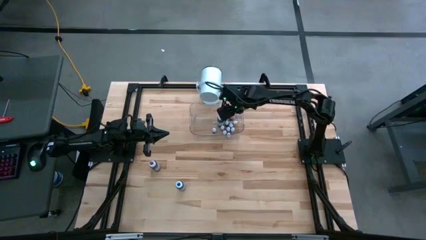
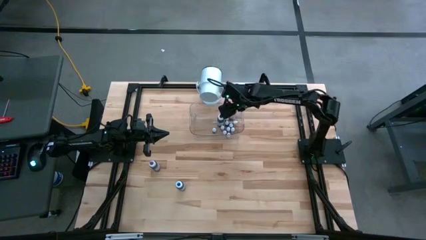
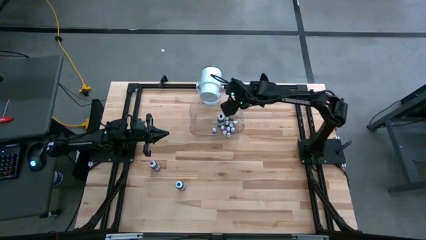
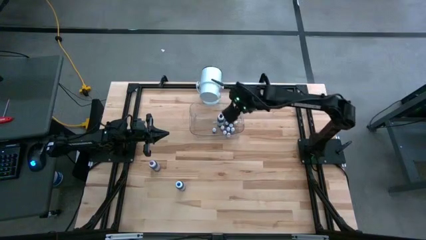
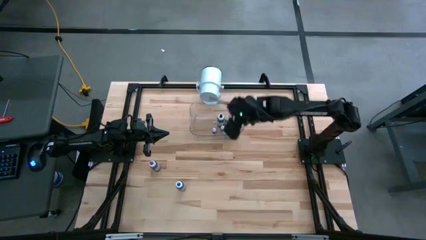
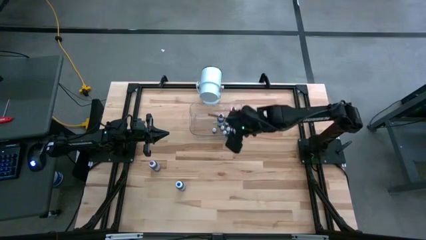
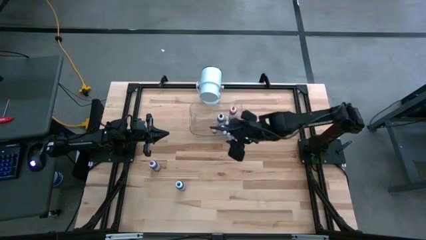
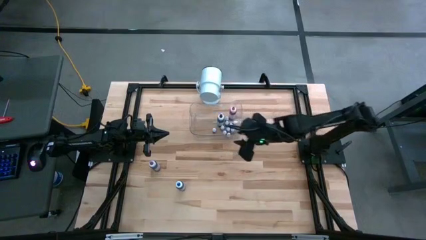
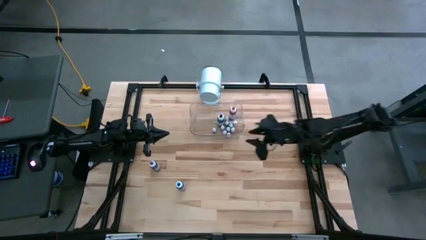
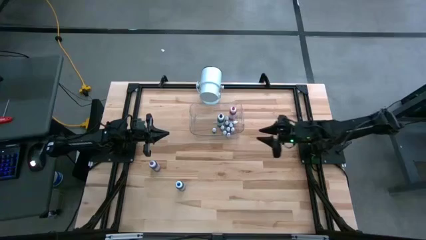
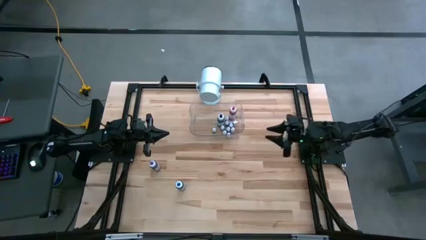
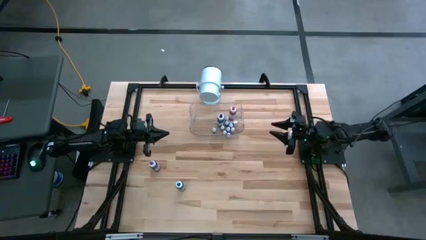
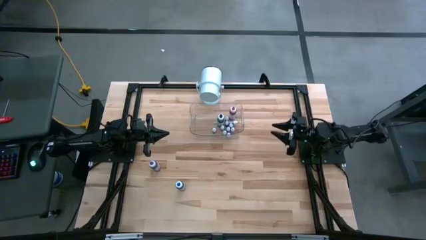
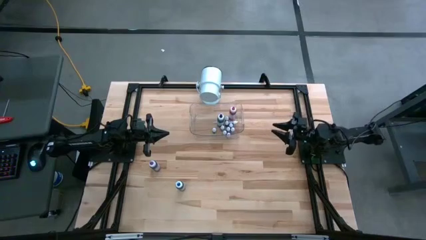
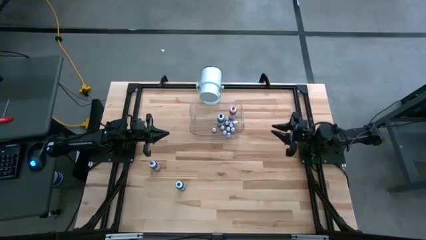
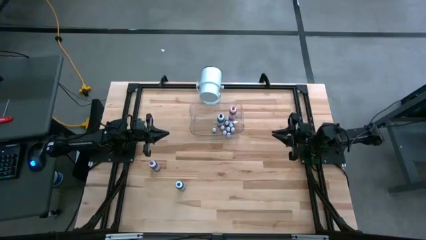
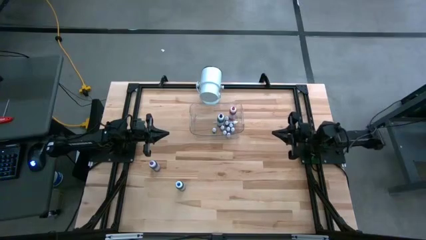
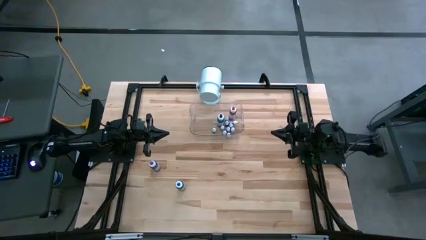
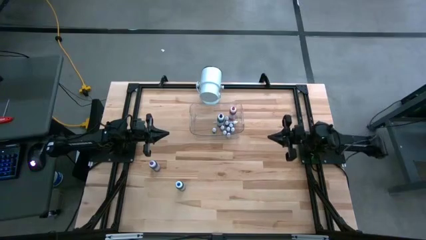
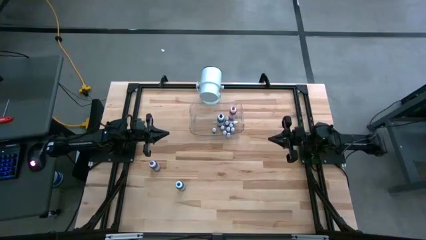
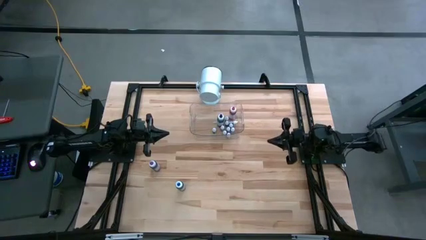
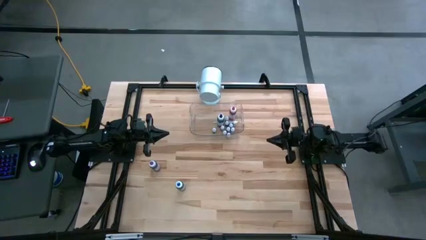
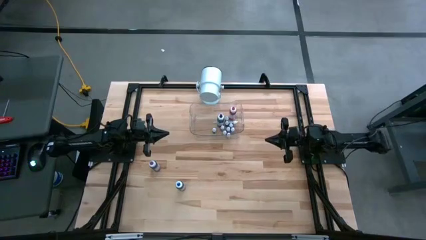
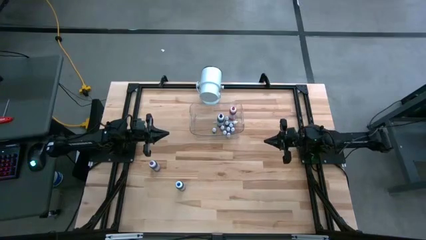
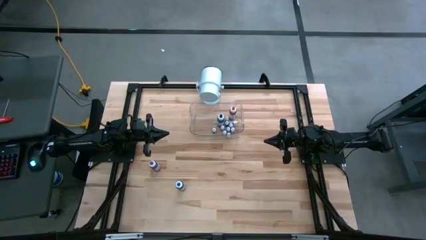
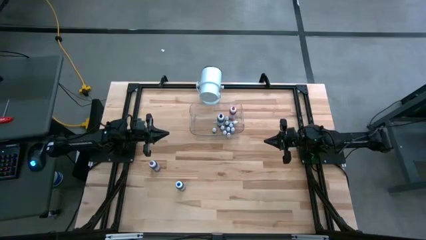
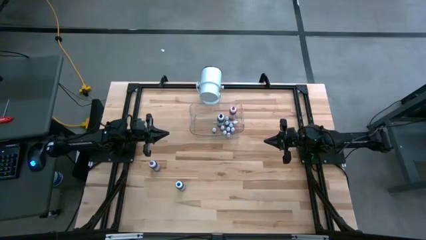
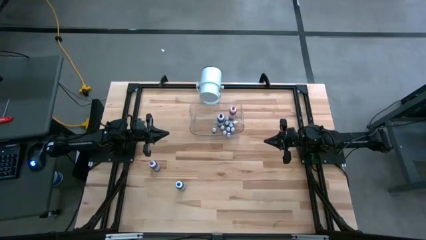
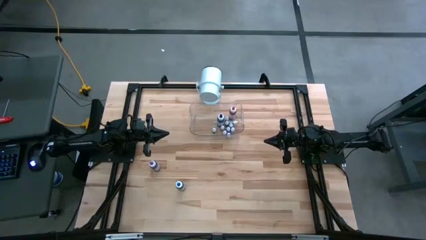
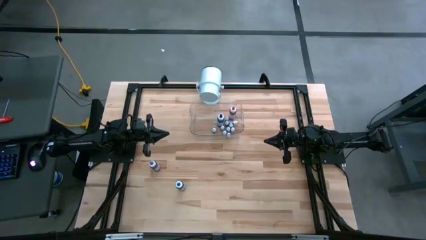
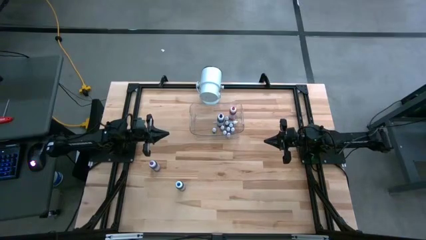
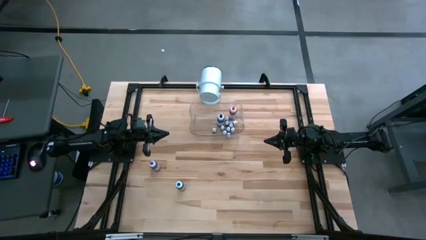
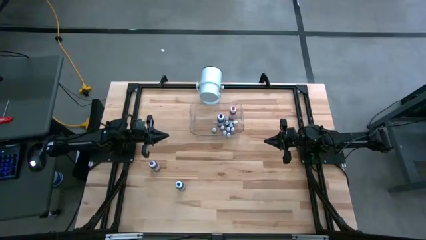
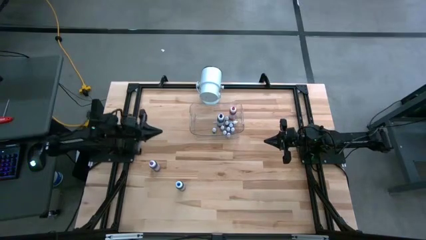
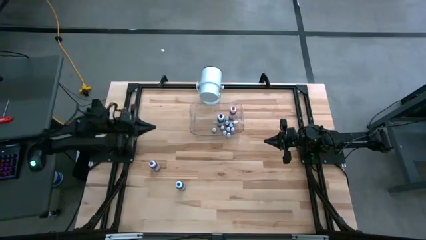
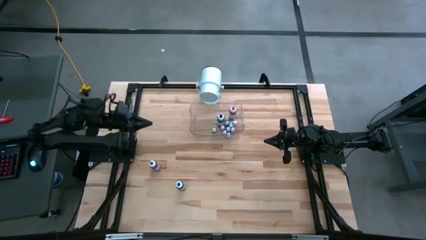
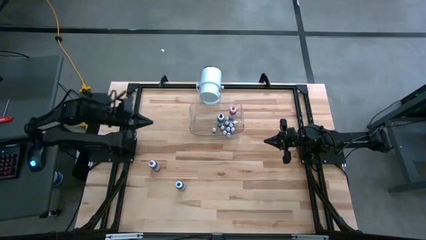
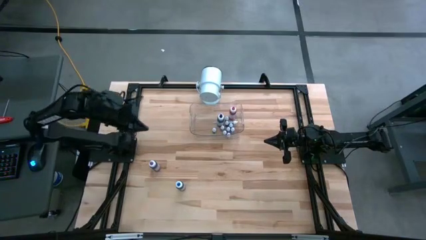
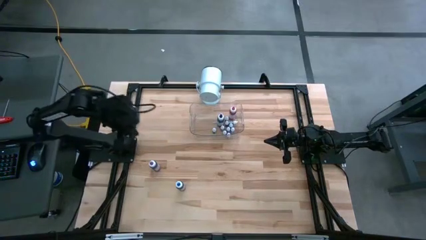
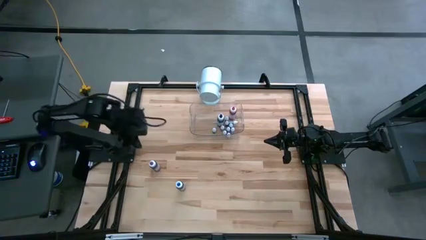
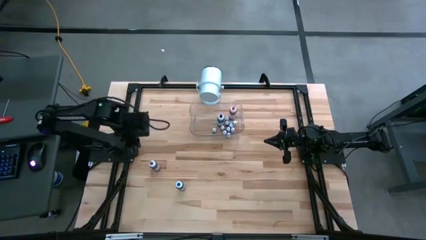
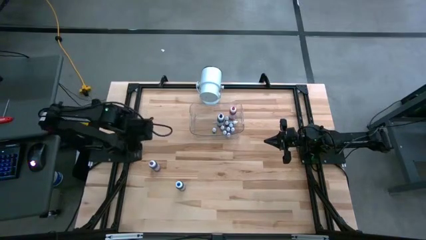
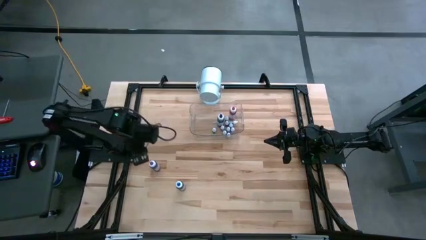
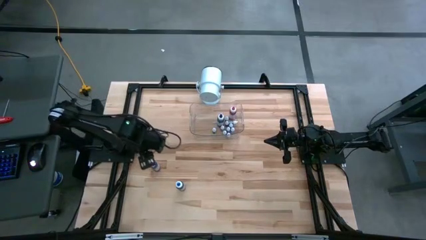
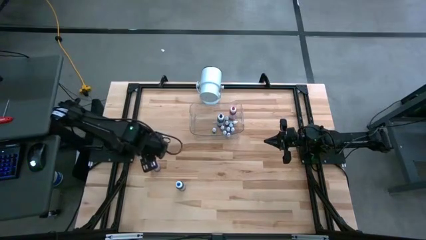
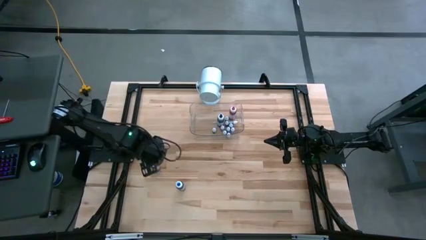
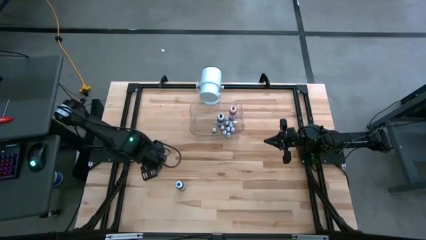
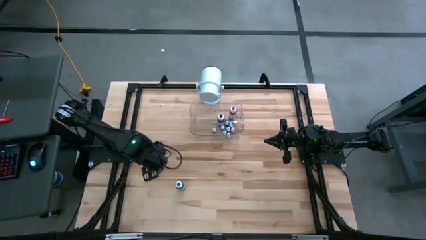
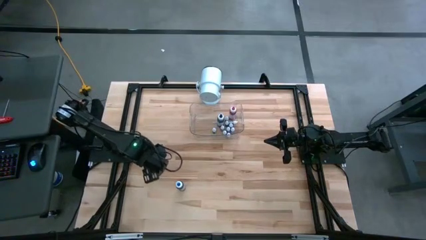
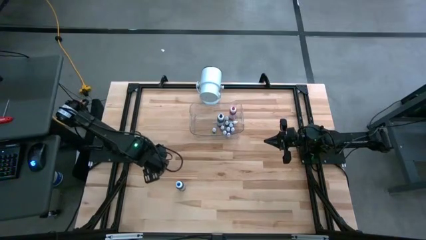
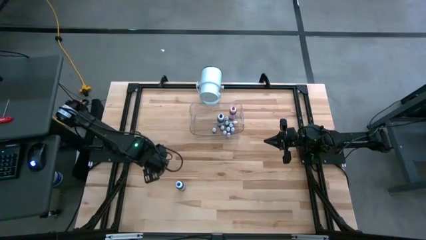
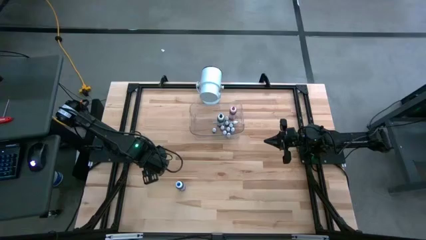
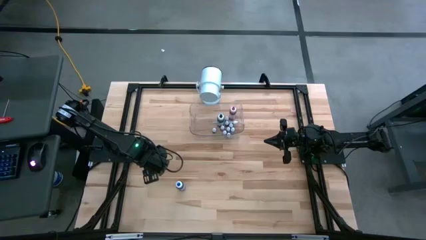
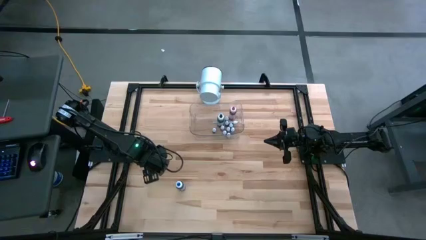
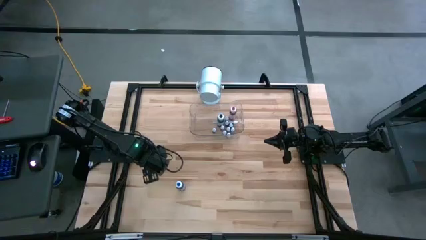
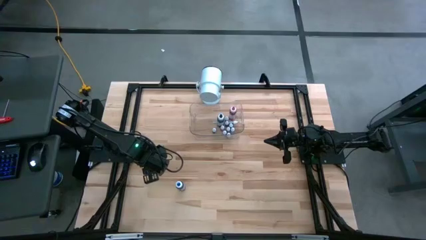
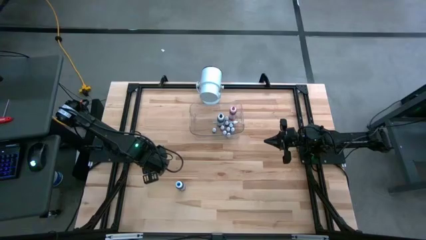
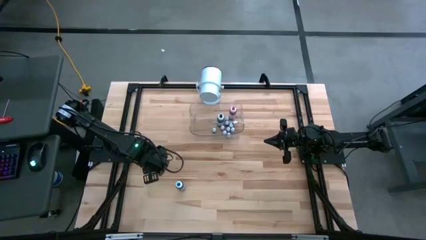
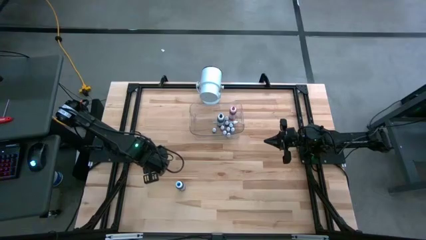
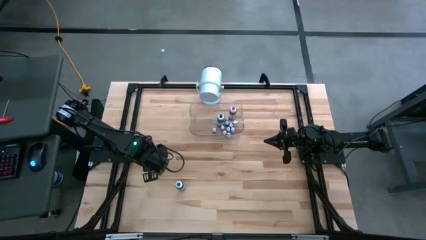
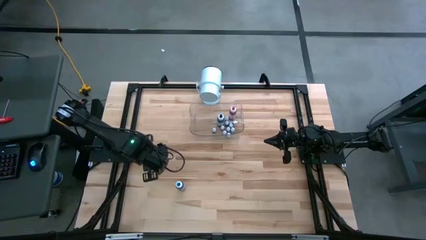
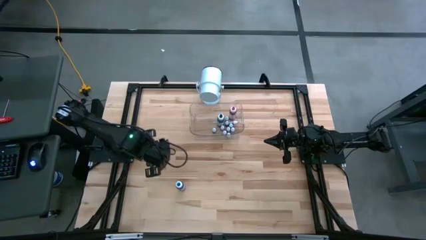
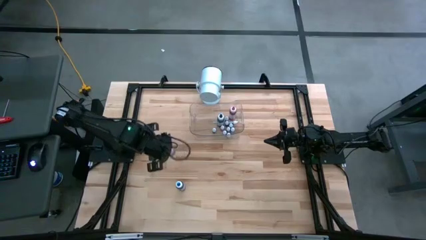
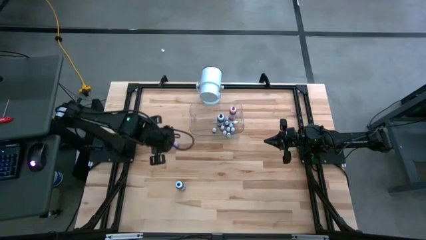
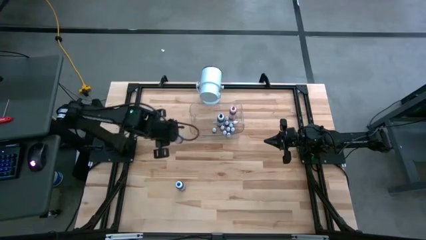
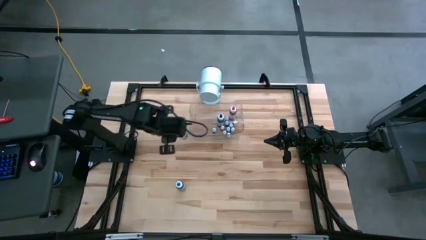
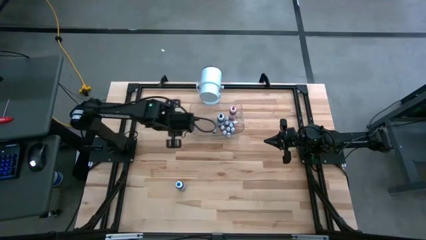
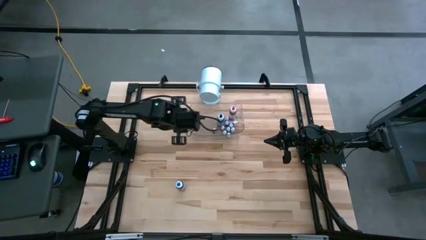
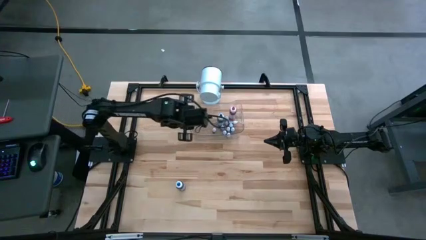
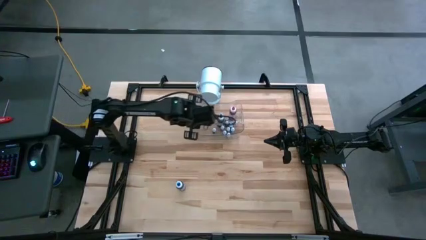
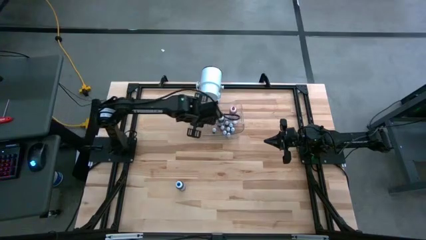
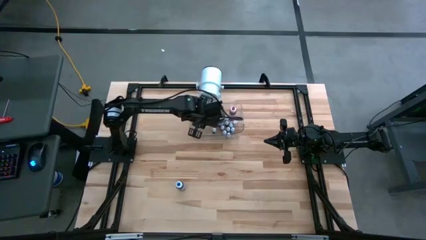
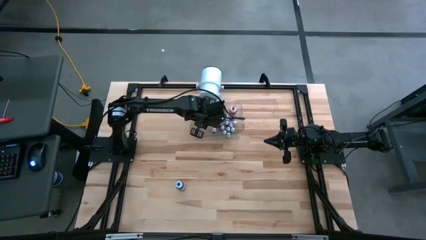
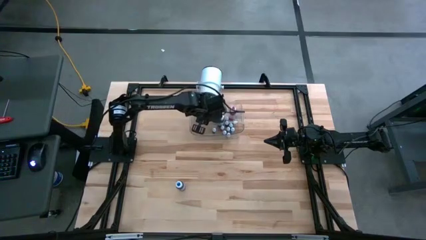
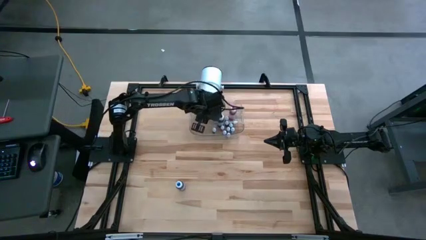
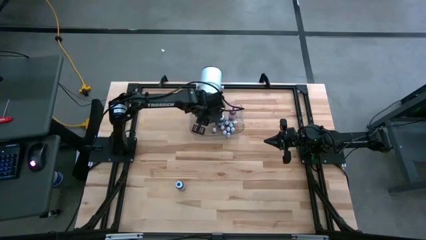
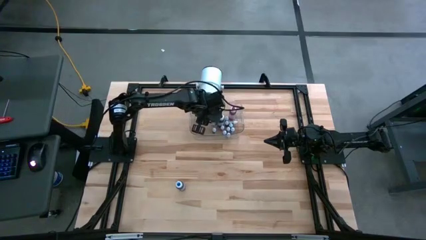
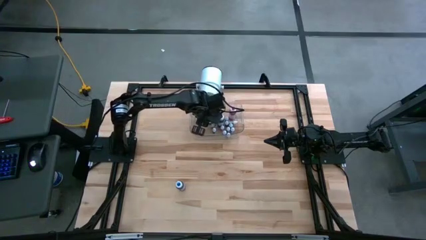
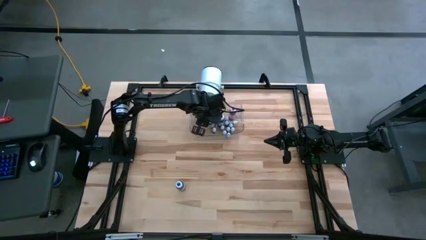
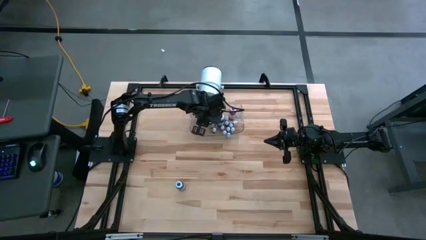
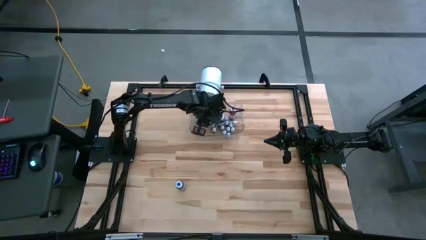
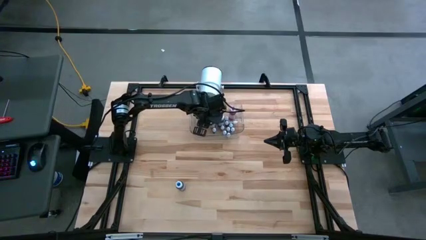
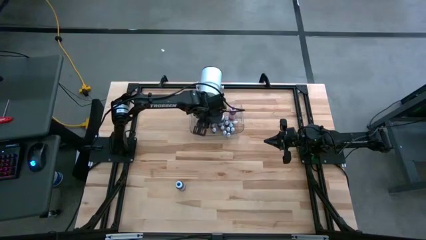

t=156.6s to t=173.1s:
Task: Pick & Place food coloring
Put the large purple food coloring bottle into the transparent bin
